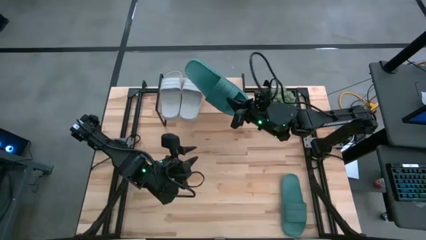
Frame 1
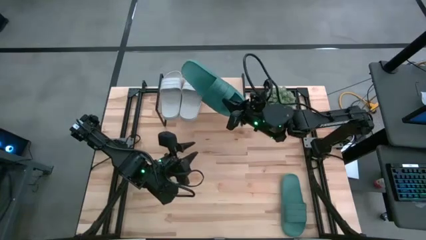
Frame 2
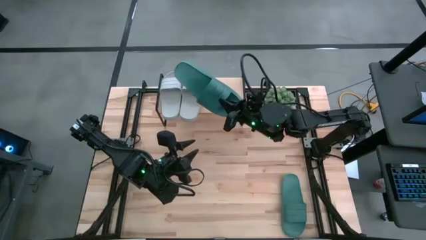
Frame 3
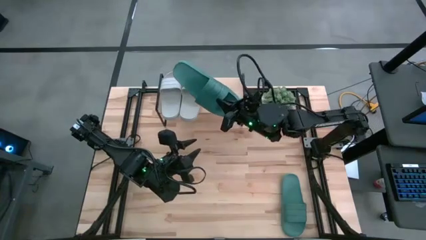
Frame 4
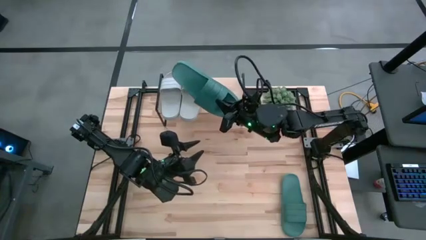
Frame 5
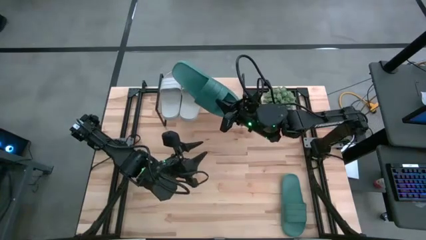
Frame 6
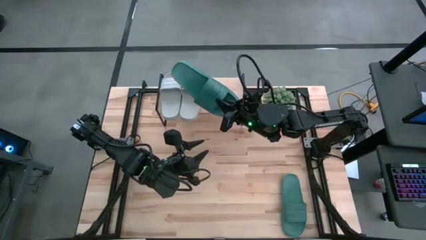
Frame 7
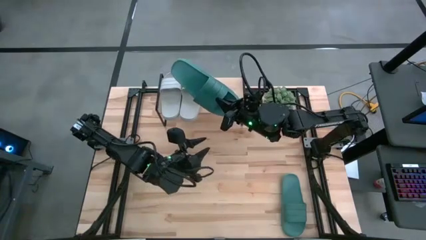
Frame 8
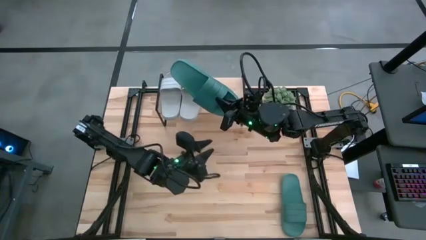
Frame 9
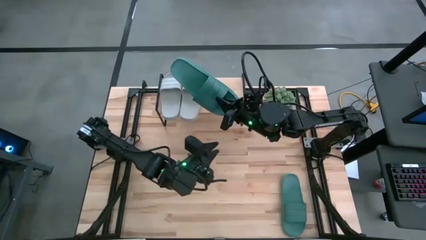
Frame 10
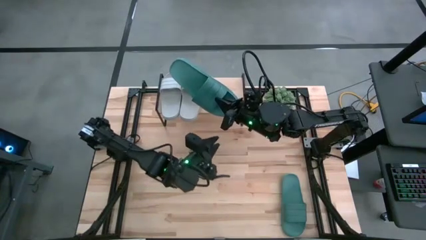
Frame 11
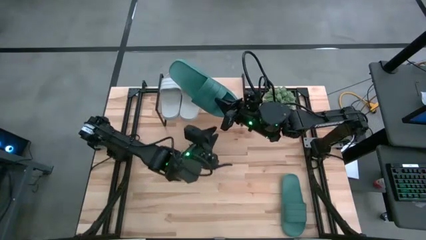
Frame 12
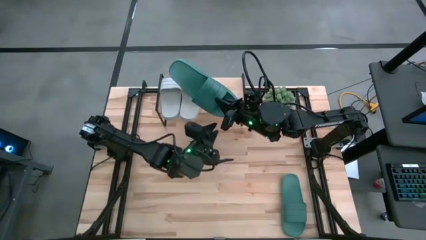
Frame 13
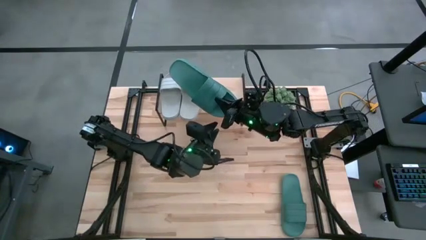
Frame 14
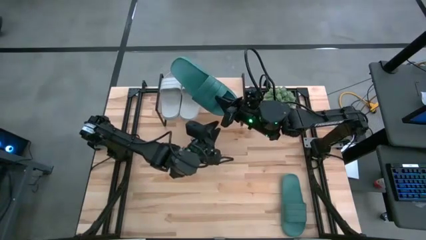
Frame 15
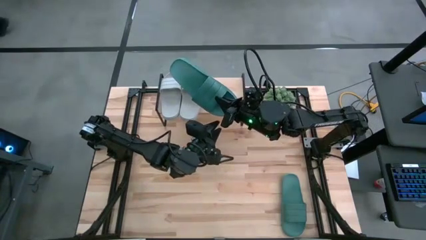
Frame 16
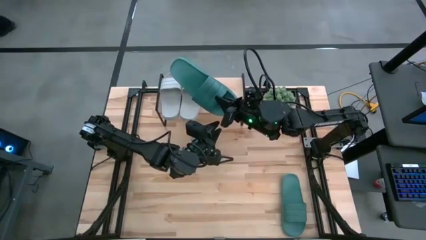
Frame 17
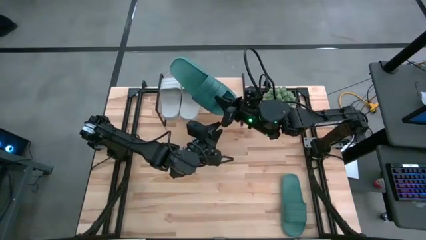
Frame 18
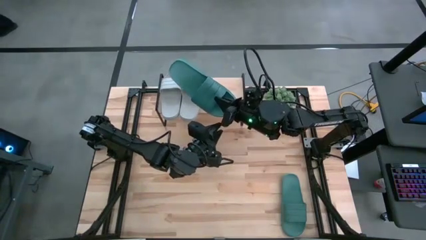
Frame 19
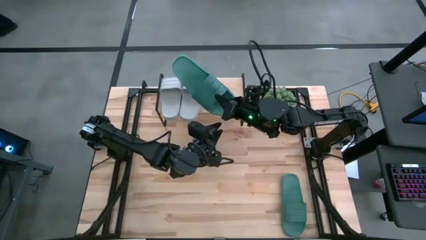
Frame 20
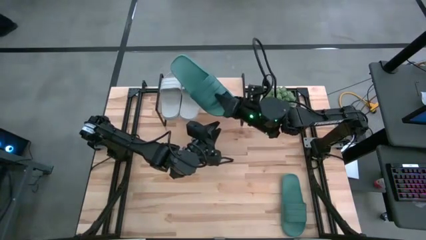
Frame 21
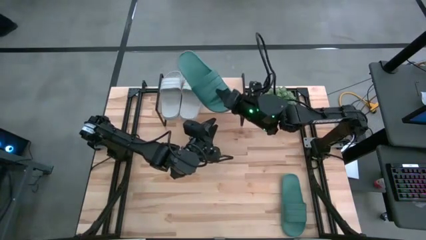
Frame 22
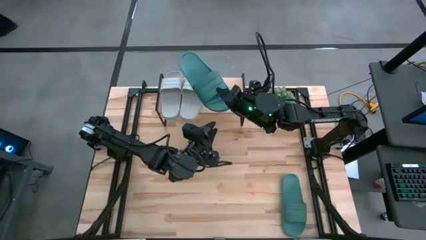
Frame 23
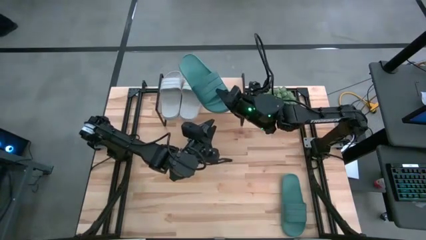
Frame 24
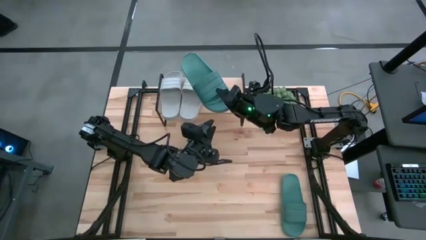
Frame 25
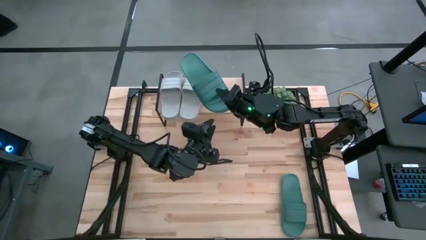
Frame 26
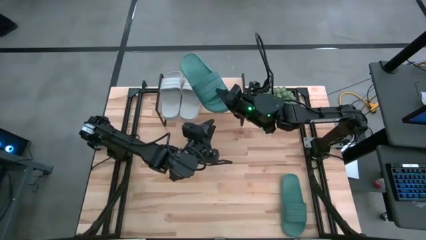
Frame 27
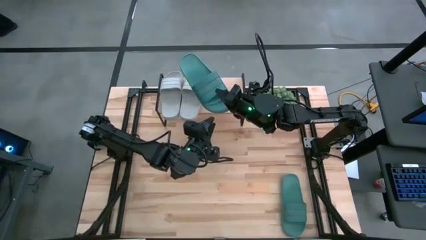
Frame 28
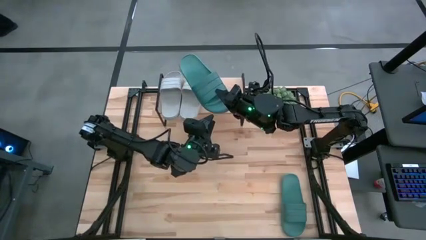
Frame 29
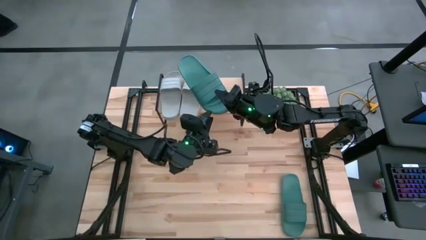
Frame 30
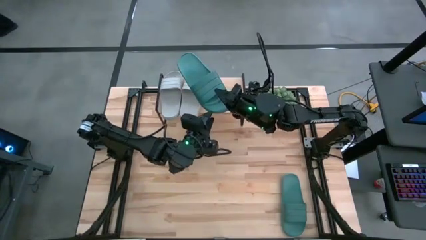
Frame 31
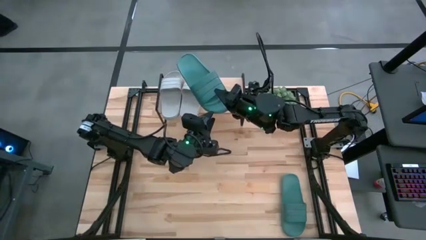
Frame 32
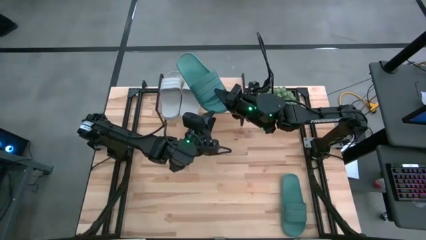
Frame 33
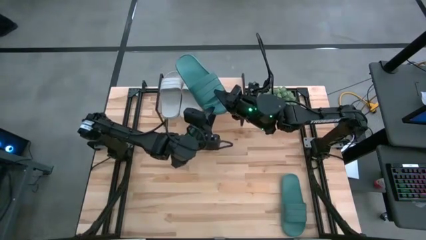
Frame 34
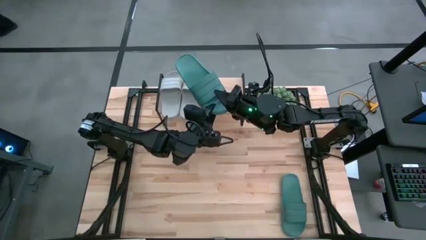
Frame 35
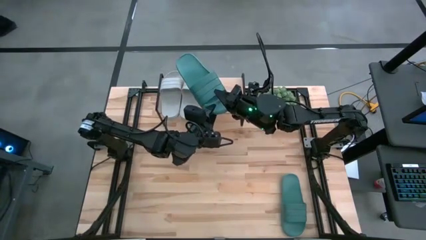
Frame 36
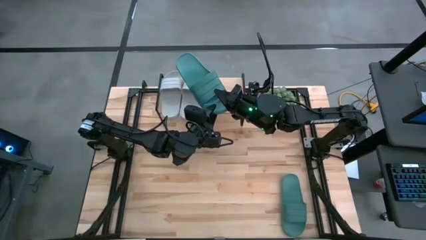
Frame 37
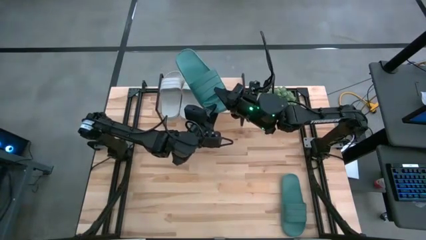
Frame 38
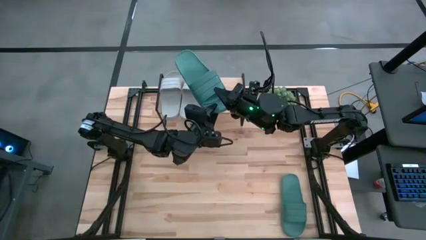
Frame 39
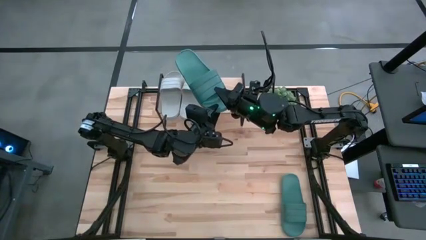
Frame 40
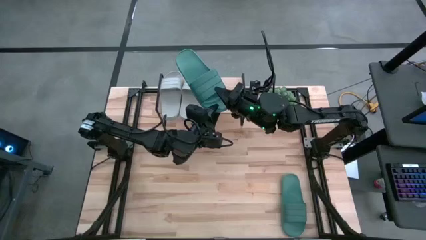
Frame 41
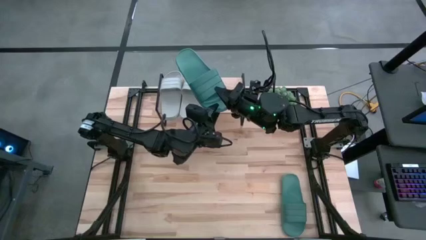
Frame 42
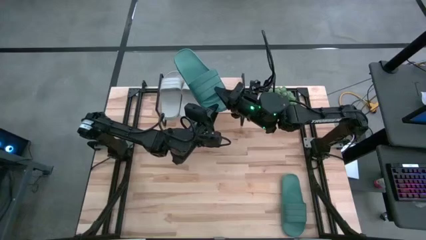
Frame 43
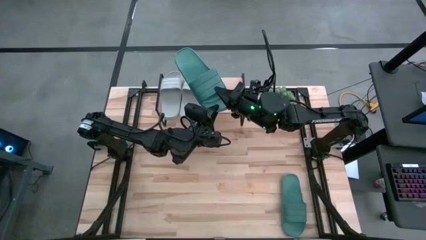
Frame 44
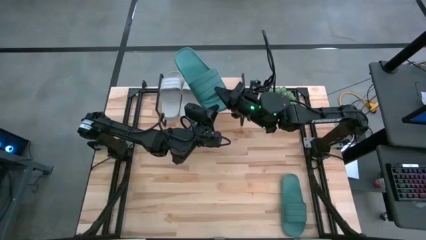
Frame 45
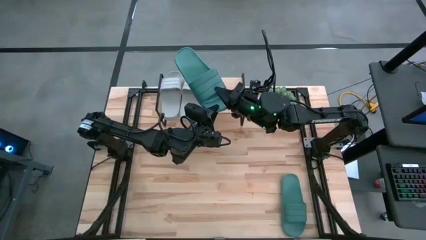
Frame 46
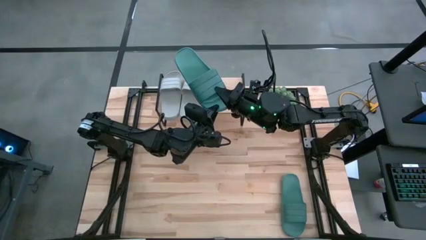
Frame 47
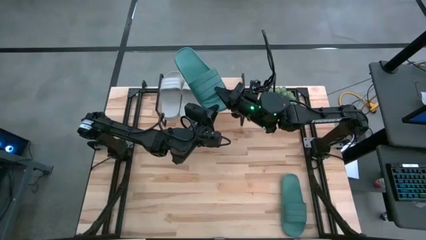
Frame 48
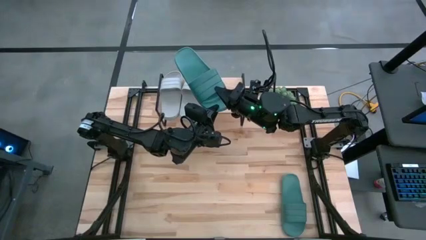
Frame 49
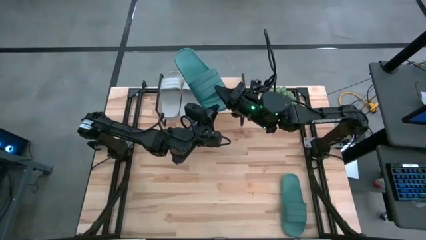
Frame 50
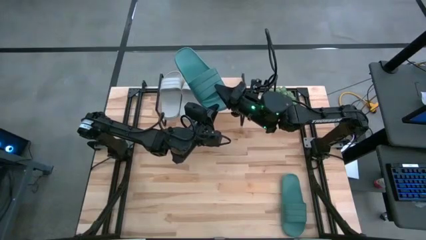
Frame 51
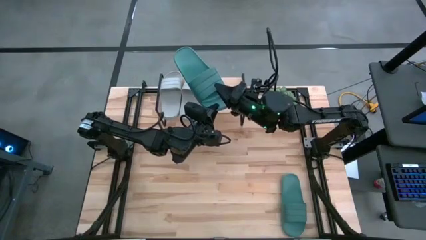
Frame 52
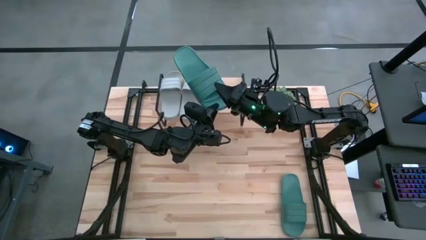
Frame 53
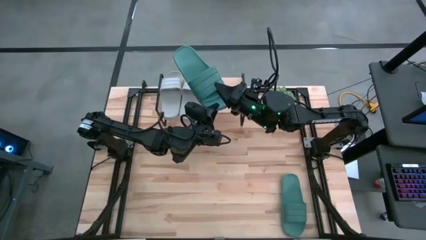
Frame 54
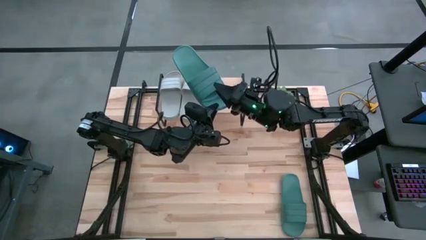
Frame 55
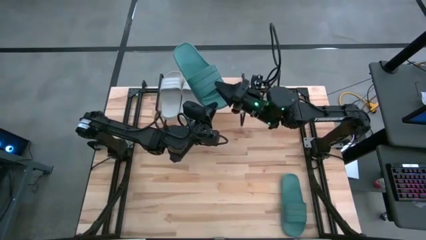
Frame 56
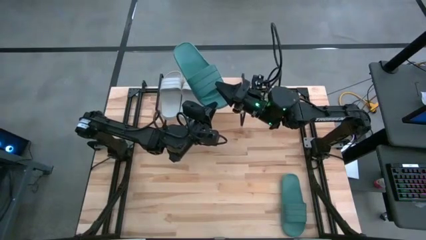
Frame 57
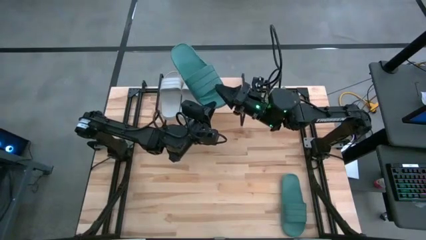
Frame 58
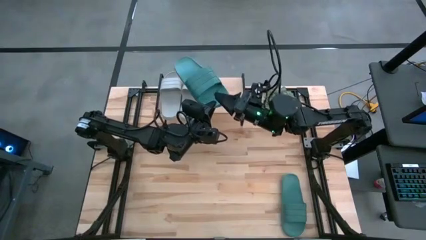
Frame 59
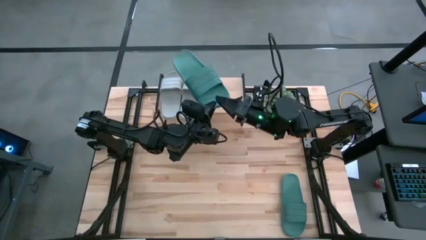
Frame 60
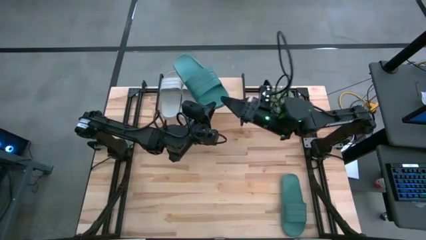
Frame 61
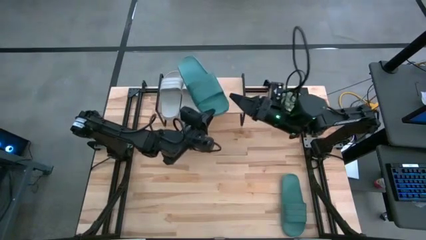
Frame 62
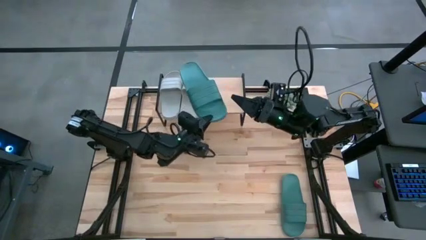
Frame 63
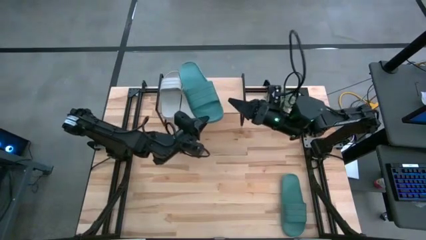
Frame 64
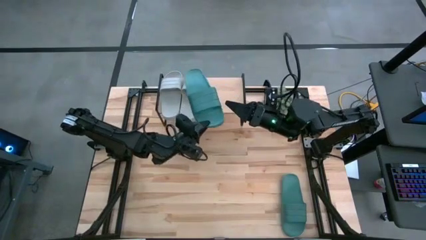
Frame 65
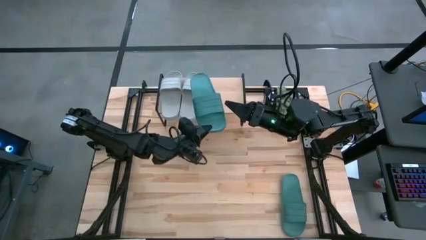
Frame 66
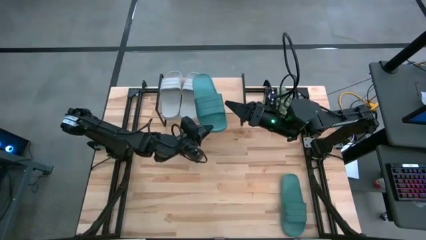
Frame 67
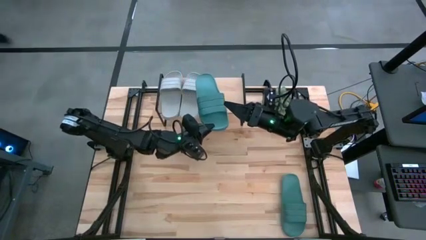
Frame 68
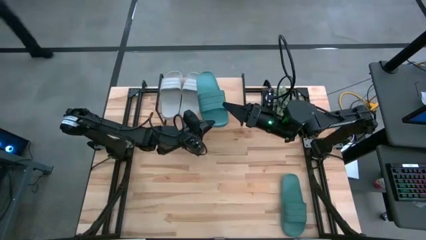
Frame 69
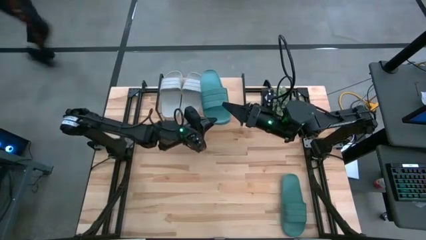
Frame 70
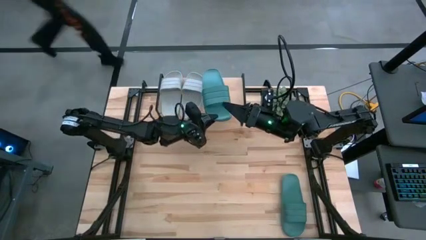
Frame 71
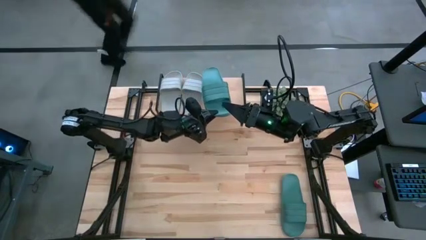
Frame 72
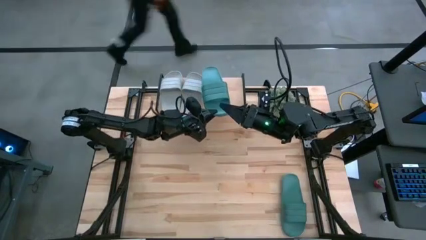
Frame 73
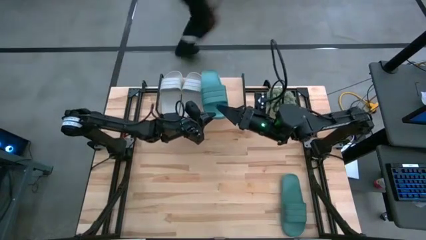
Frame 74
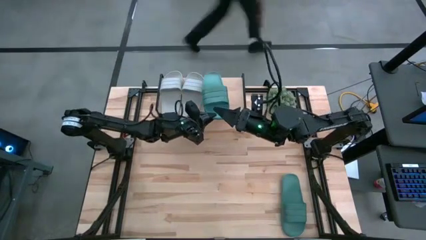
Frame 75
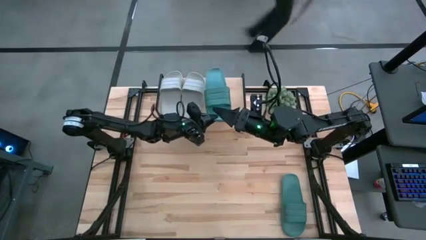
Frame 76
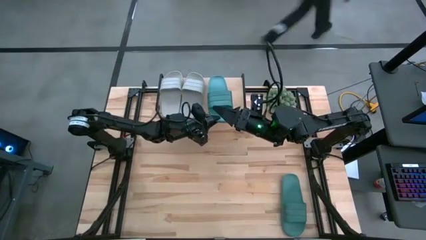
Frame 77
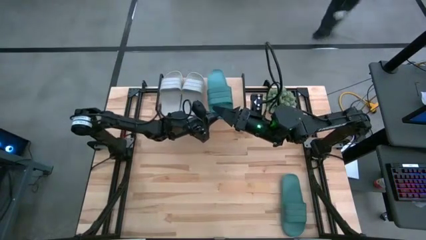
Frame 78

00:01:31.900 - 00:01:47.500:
Task: Pick and place slides into the shelf
Put the left green slipper on the shelf
